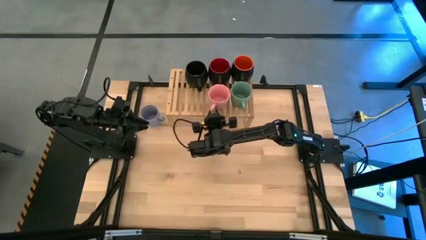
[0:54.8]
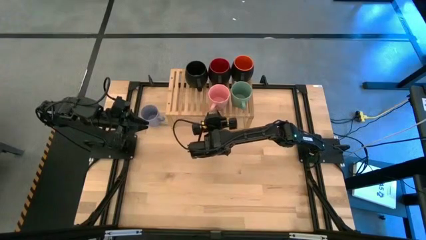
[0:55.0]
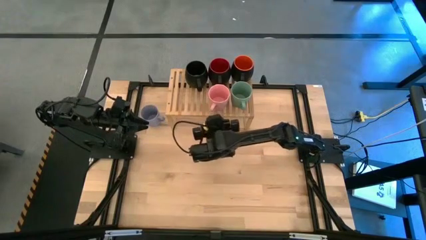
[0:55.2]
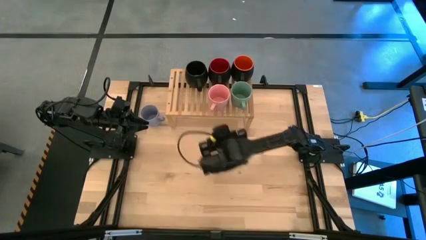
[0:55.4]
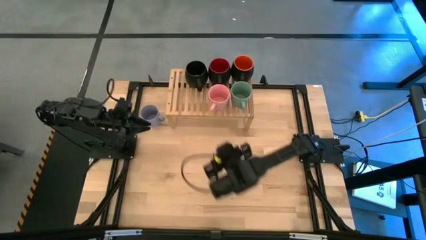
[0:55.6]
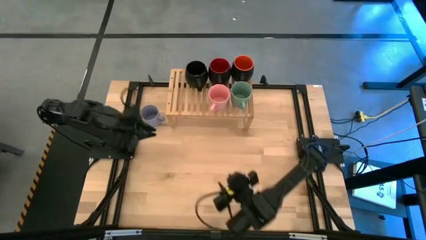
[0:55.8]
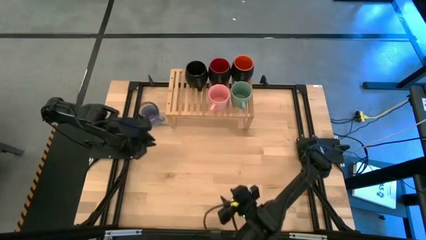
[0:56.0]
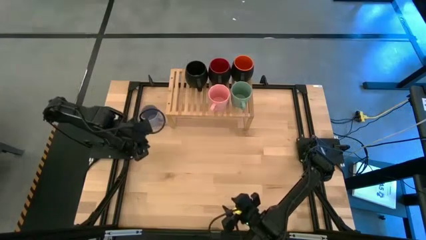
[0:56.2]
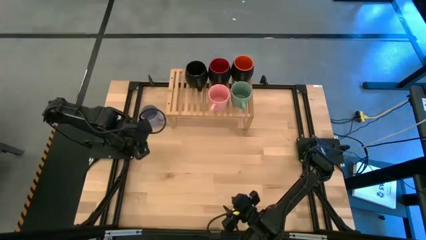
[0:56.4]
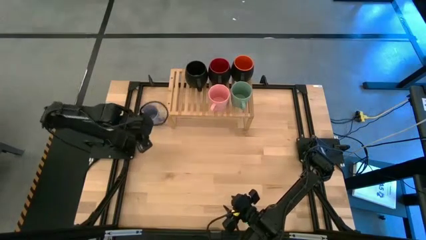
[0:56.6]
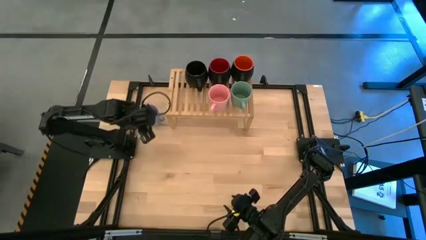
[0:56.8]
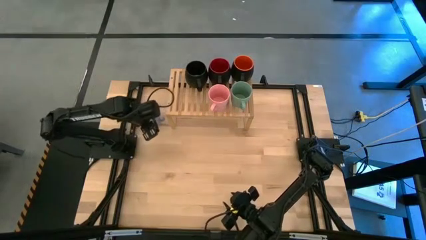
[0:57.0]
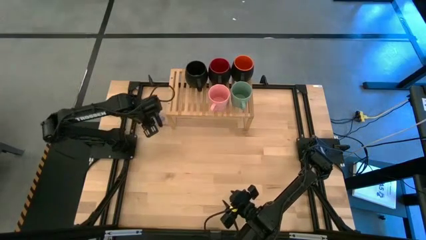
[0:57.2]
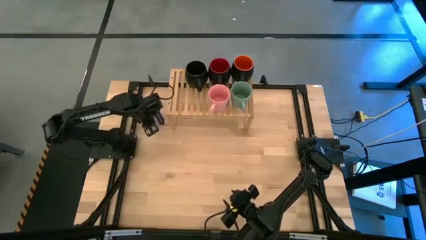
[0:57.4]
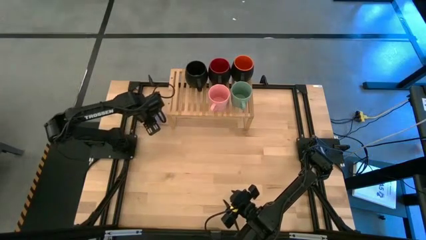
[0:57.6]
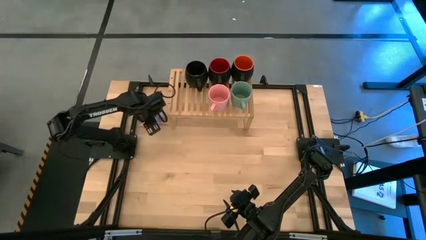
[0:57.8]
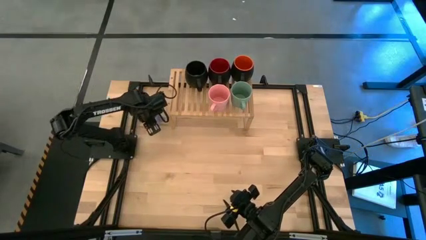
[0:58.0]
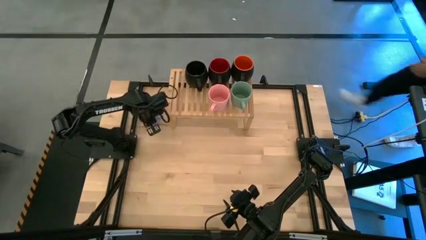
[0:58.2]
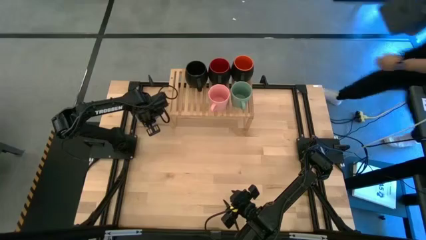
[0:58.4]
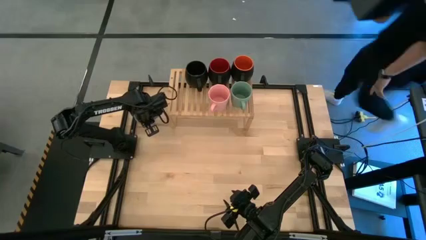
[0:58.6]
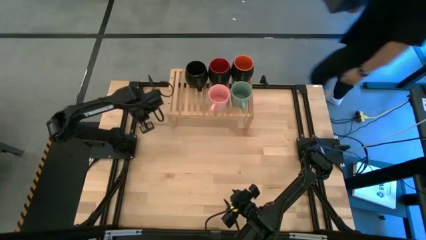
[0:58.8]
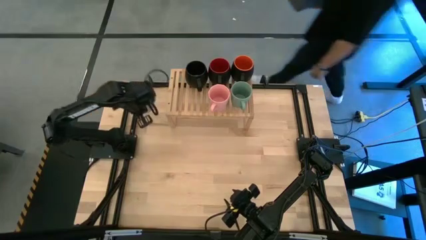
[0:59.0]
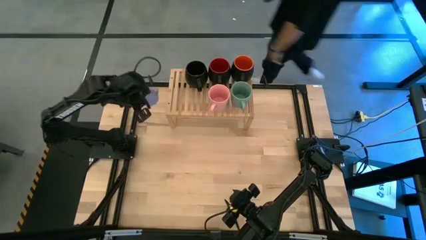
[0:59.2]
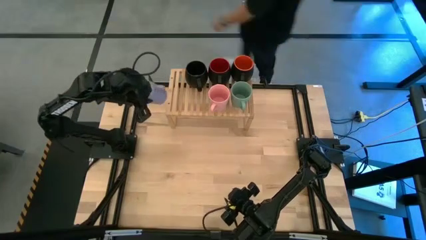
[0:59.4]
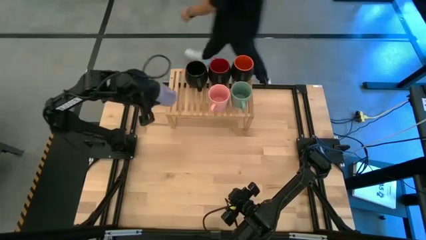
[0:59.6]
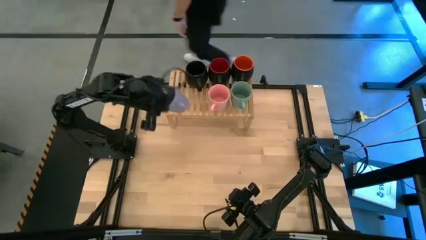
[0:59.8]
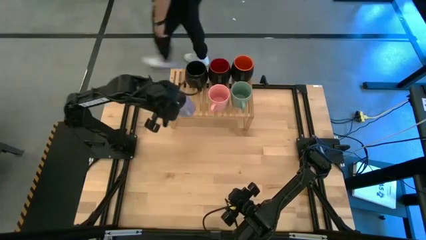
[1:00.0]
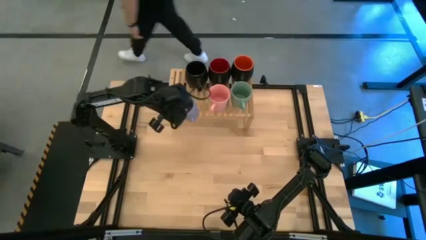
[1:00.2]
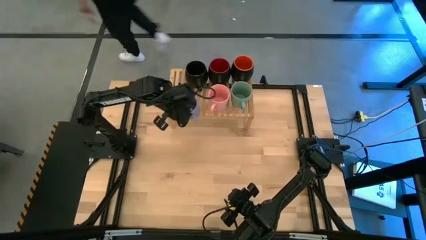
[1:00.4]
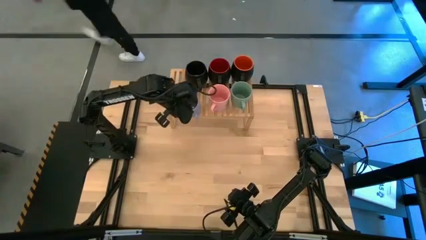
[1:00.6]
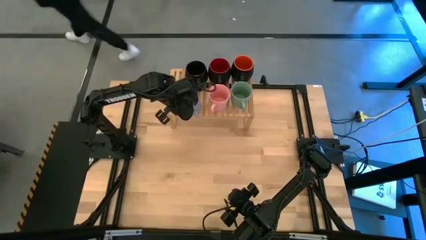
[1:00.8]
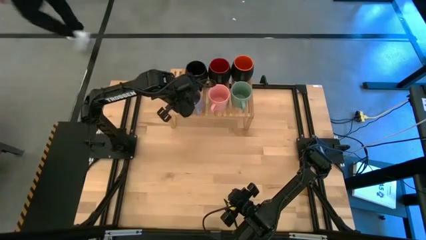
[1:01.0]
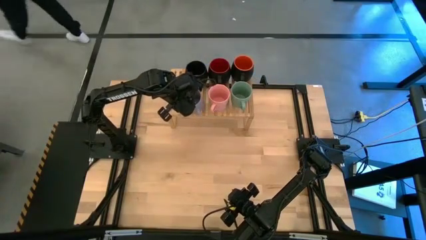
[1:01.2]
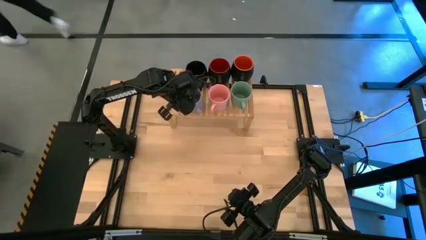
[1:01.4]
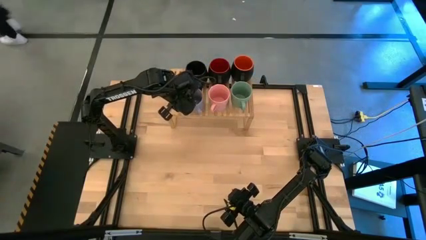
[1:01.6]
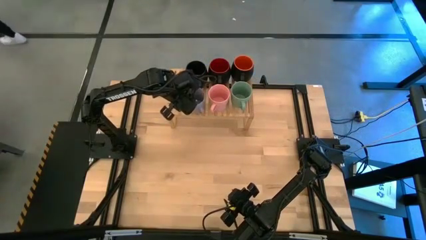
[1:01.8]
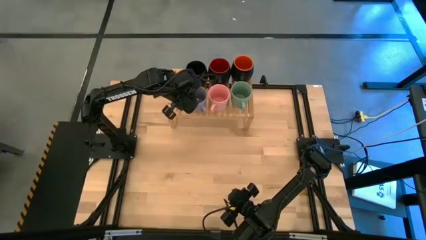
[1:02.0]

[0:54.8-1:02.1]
Task: Place coffee mugs
Put the blue mugs on the shelf

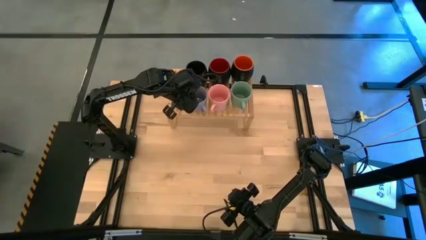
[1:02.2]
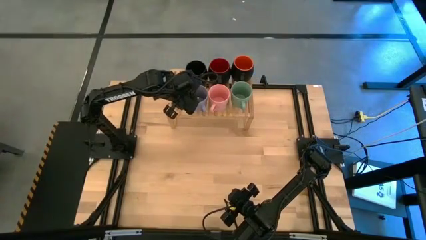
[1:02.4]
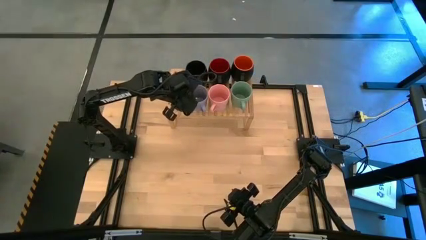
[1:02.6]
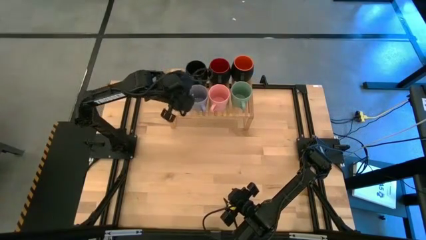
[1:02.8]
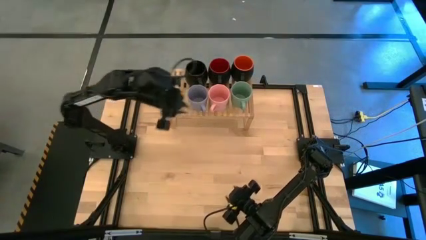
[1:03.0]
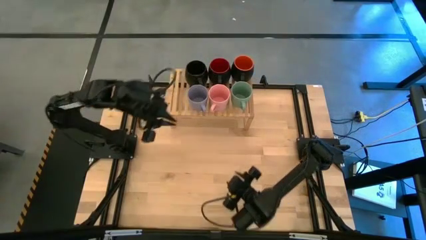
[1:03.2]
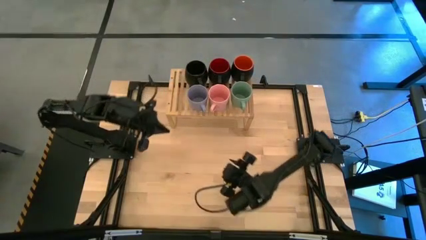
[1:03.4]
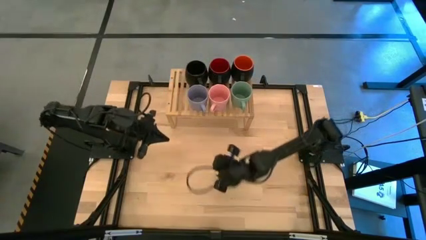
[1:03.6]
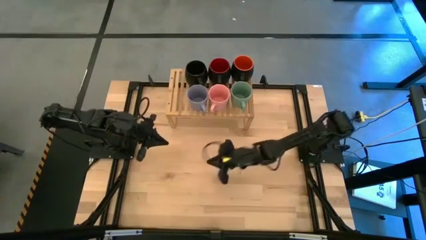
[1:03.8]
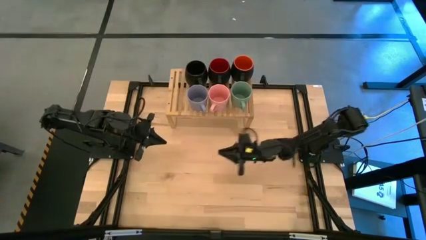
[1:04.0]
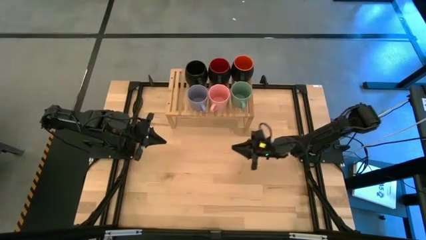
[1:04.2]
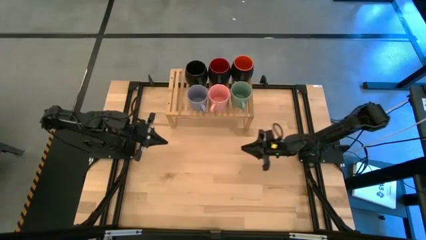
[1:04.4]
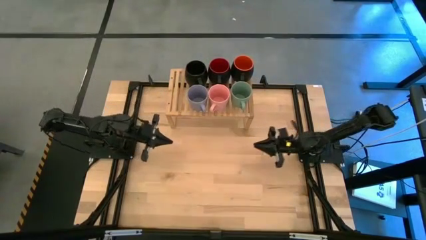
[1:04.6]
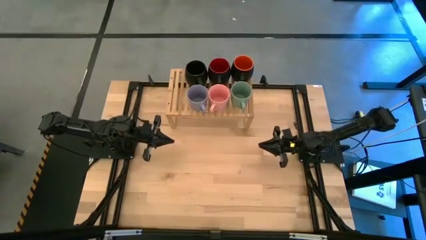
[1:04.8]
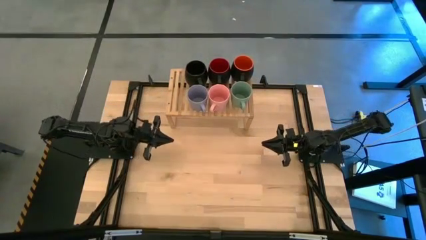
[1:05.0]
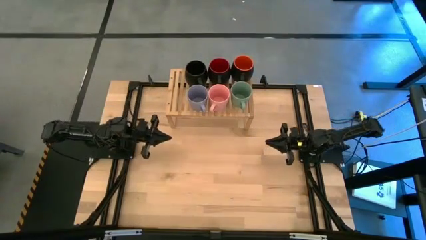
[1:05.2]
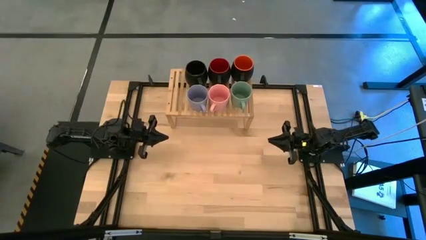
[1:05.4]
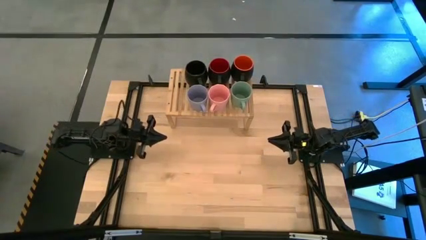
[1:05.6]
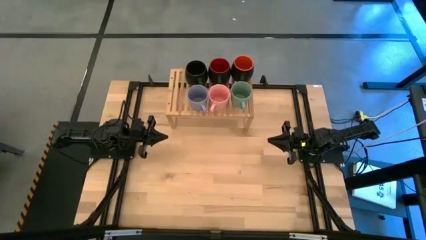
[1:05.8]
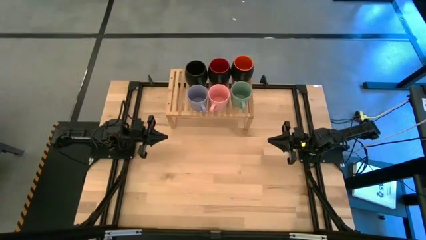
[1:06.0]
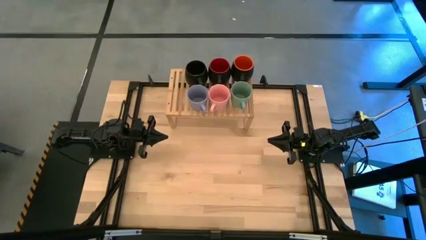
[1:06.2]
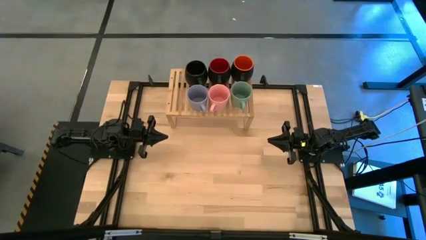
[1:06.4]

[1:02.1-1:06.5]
Return to Home Position

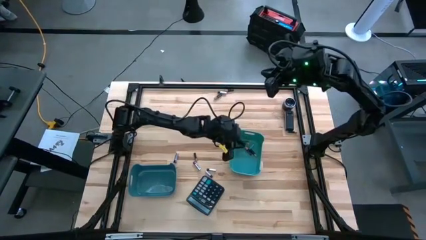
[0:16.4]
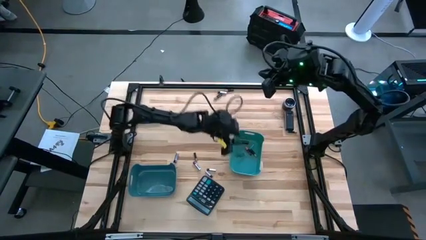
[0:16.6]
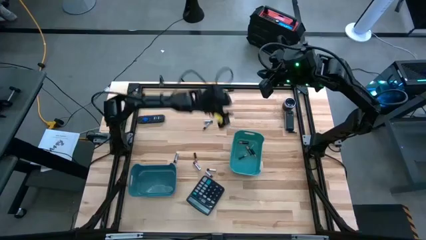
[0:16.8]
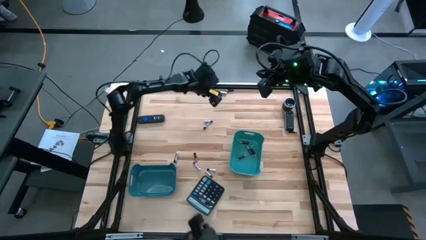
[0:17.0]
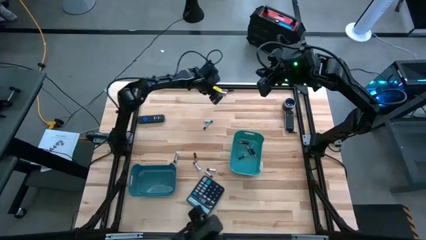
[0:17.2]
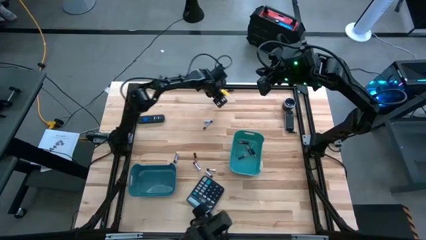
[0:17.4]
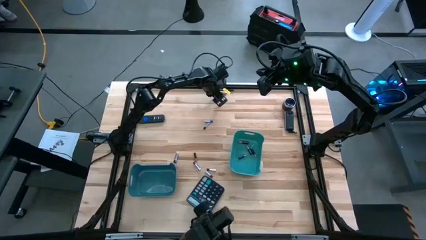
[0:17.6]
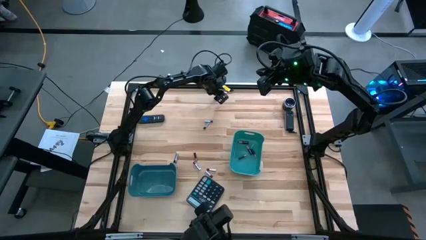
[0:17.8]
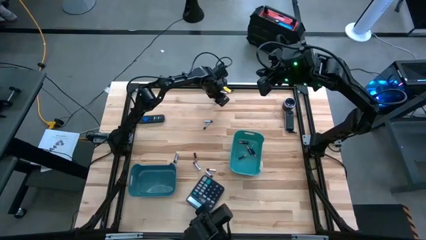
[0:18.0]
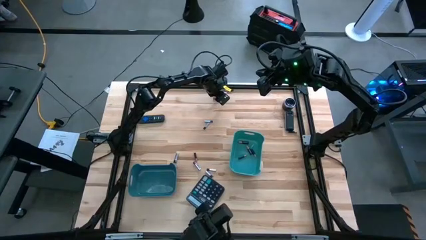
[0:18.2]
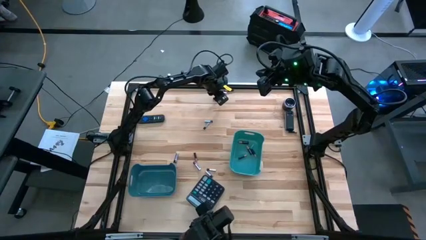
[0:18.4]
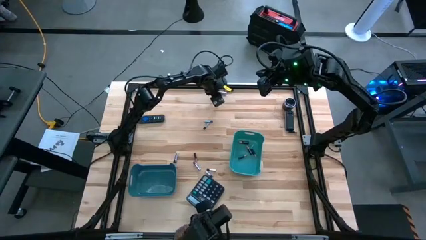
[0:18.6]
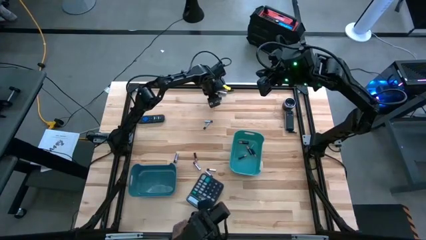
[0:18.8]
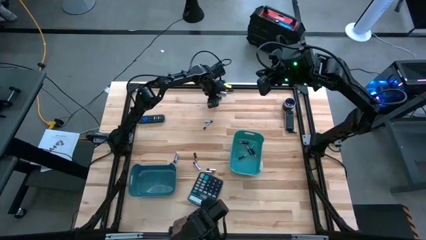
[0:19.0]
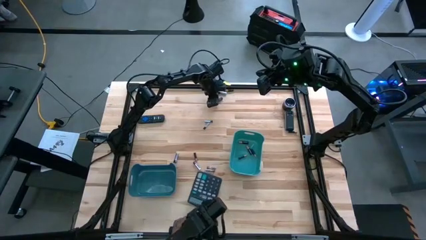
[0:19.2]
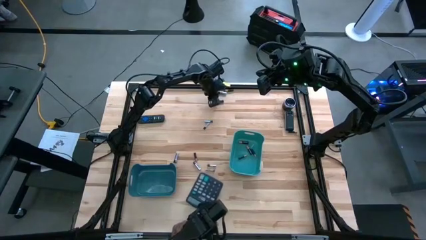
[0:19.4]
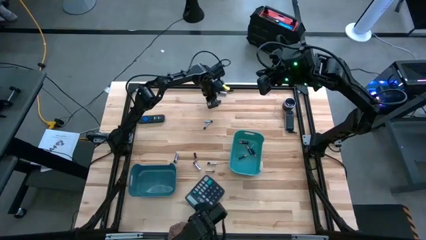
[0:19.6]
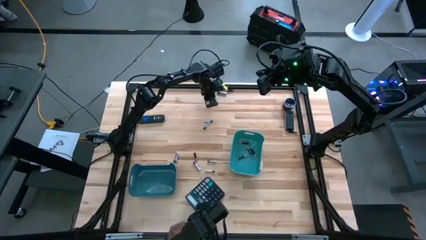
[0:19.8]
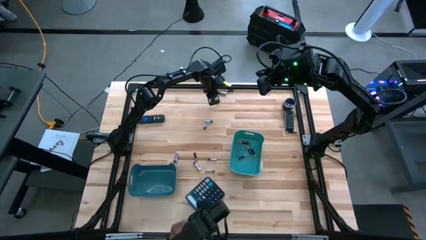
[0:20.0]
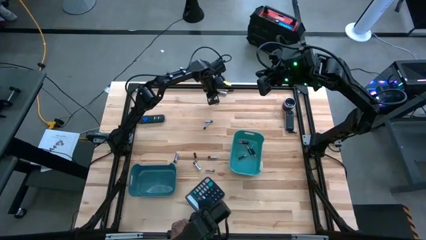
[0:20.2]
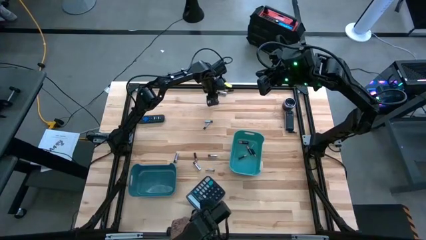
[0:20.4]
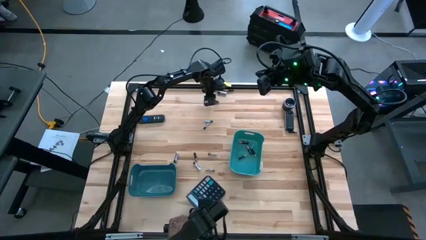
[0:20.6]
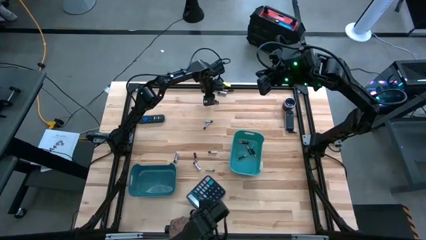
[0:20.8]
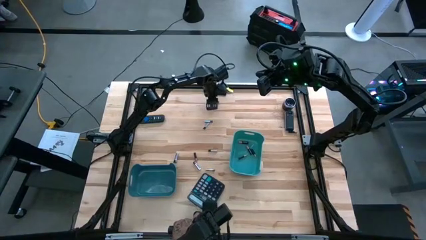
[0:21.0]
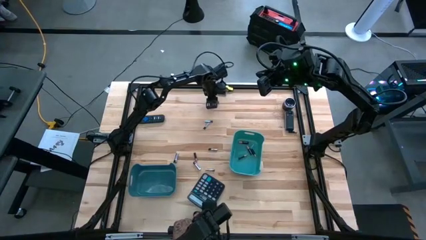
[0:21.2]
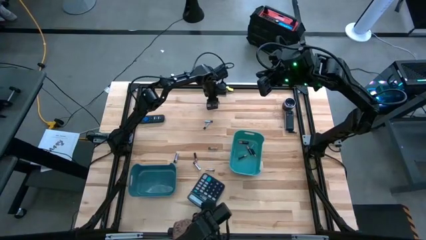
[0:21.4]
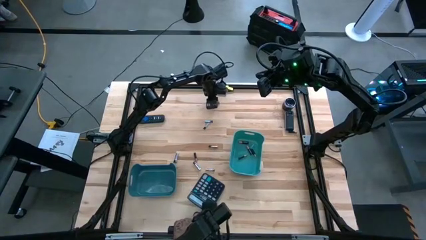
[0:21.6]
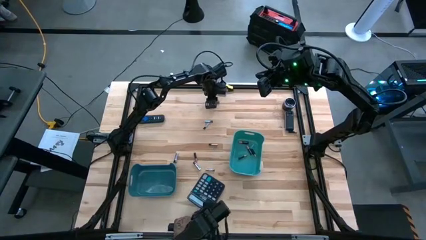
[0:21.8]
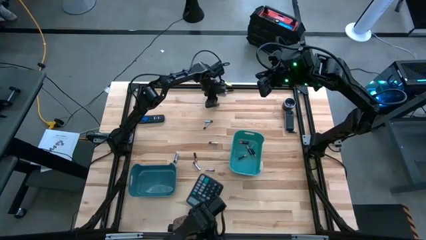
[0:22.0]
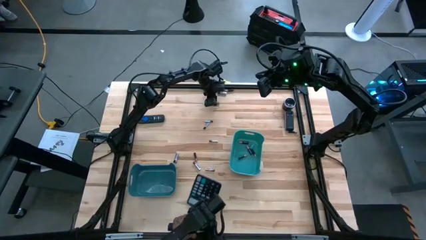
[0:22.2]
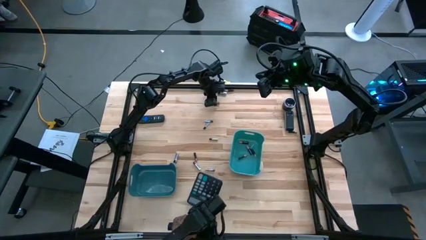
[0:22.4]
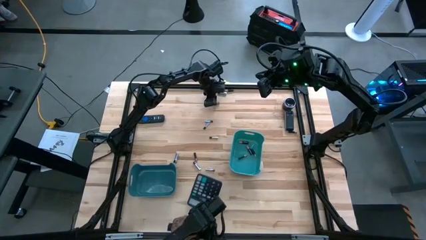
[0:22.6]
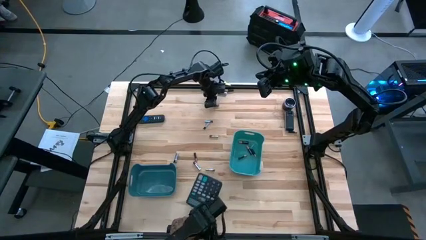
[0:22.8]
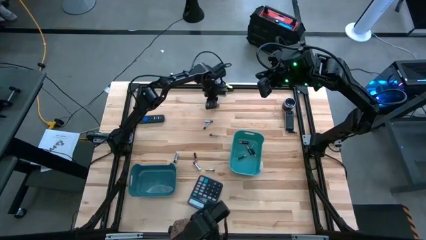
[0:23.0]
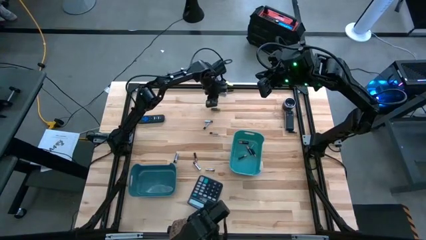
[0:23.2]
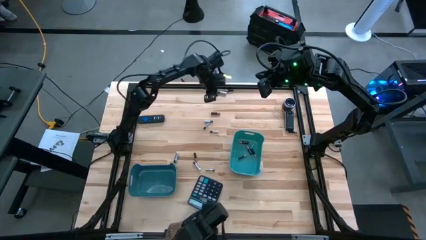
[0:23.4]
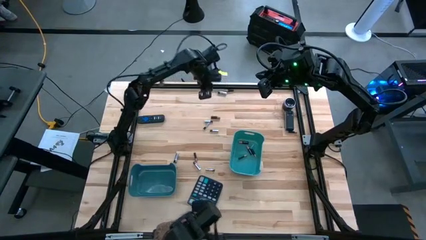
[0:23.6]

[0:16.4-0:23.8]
Task: Sort batteries
Put the black battery into the dark green bin
